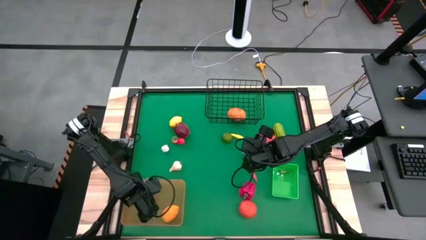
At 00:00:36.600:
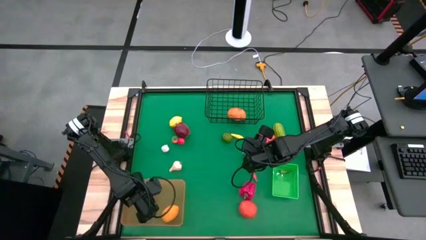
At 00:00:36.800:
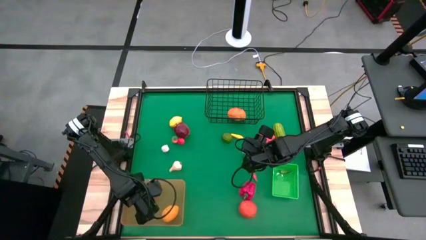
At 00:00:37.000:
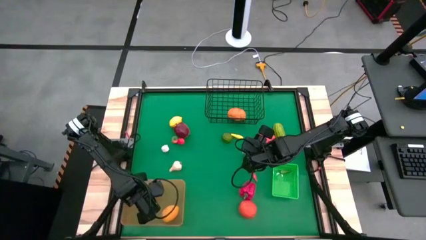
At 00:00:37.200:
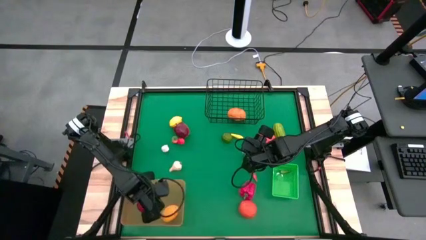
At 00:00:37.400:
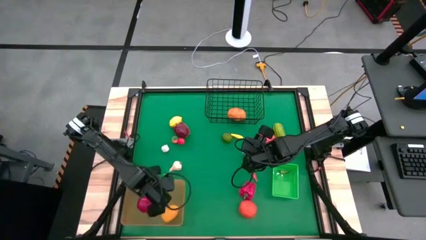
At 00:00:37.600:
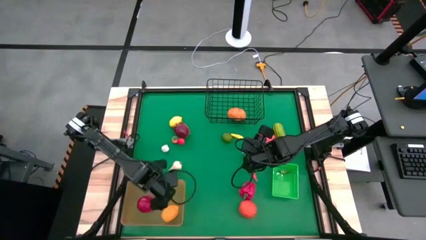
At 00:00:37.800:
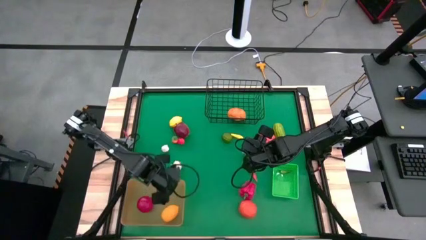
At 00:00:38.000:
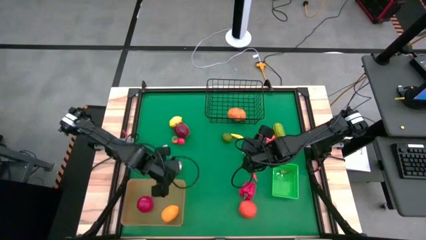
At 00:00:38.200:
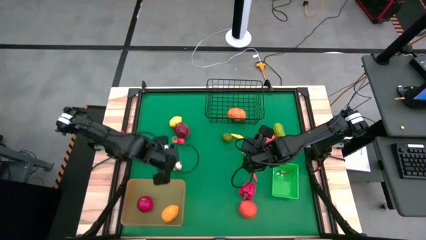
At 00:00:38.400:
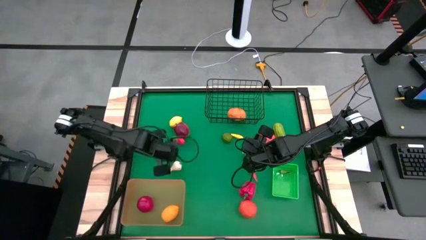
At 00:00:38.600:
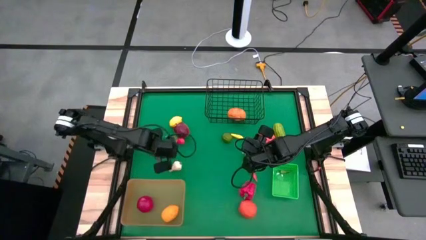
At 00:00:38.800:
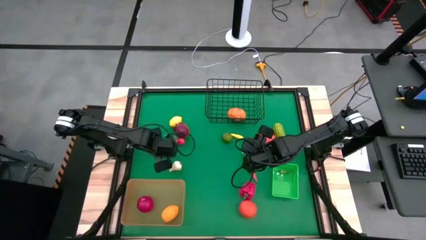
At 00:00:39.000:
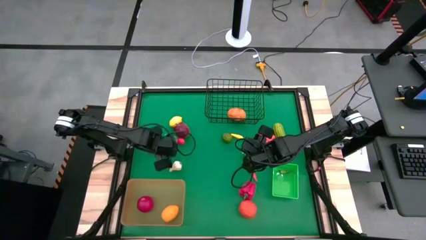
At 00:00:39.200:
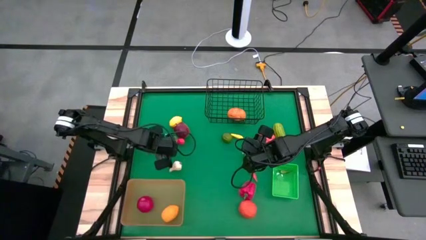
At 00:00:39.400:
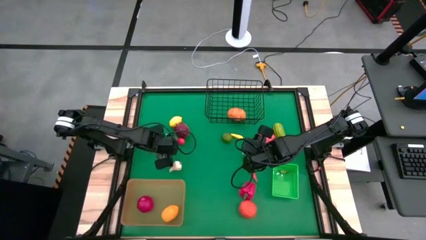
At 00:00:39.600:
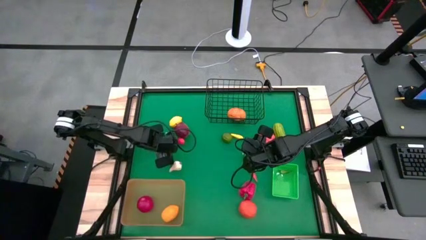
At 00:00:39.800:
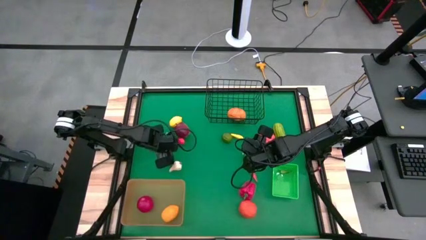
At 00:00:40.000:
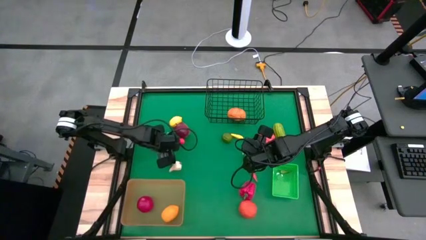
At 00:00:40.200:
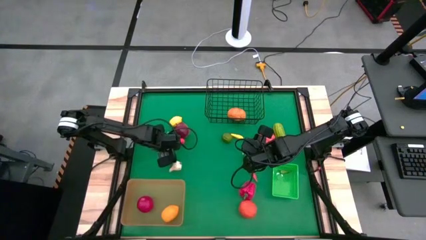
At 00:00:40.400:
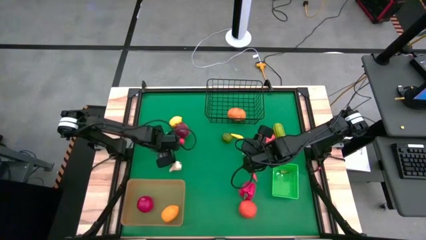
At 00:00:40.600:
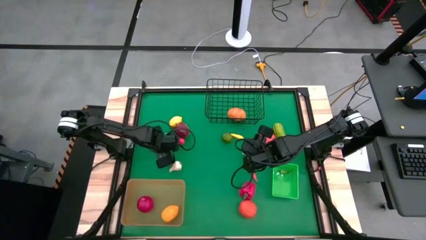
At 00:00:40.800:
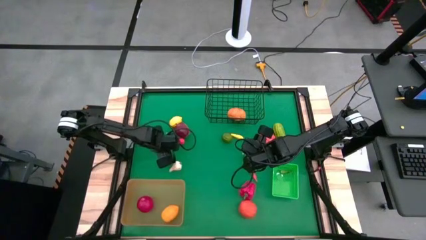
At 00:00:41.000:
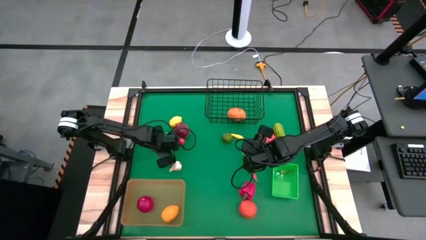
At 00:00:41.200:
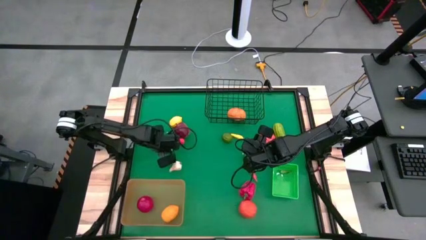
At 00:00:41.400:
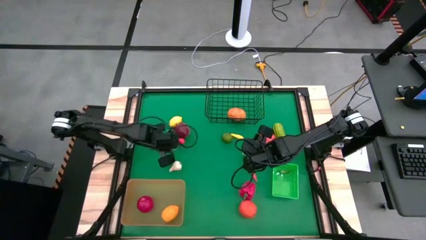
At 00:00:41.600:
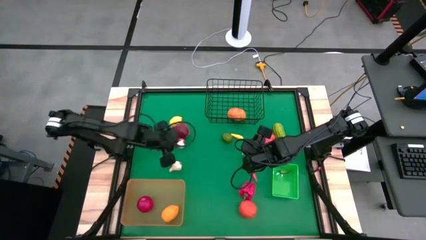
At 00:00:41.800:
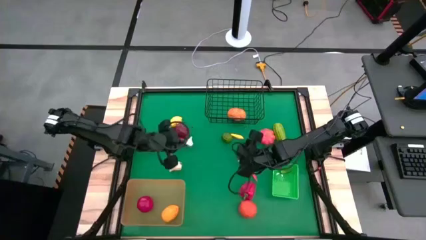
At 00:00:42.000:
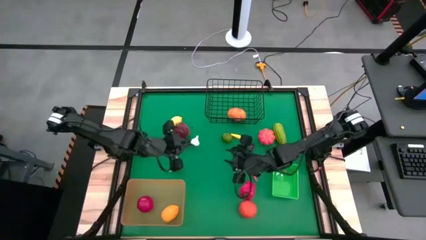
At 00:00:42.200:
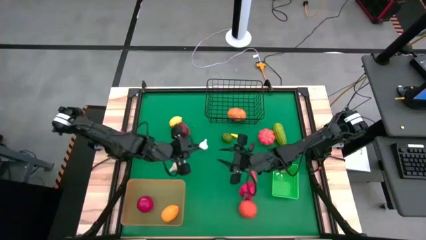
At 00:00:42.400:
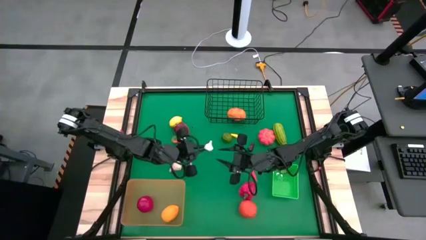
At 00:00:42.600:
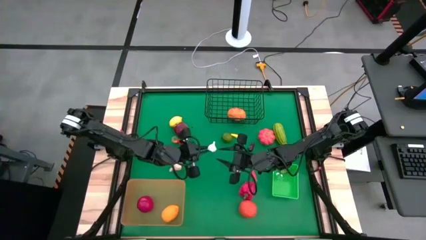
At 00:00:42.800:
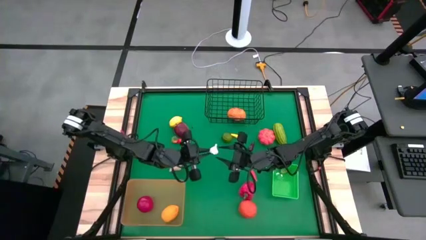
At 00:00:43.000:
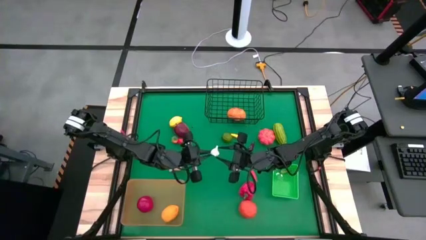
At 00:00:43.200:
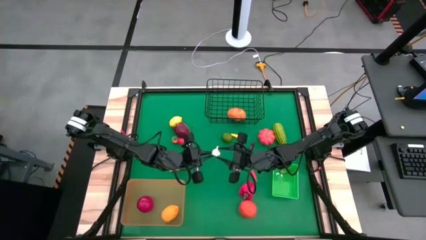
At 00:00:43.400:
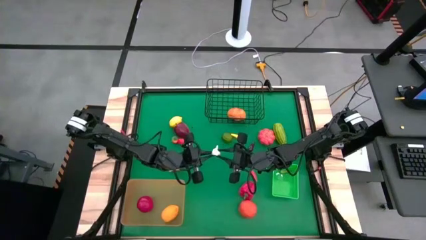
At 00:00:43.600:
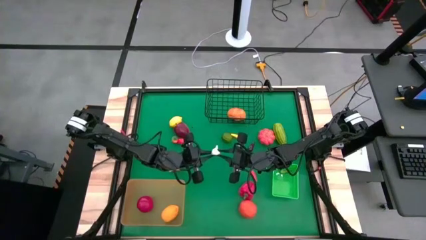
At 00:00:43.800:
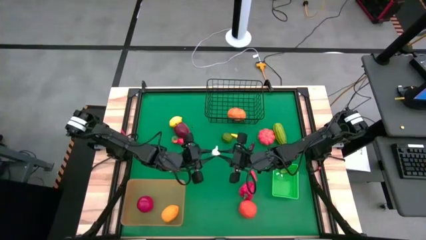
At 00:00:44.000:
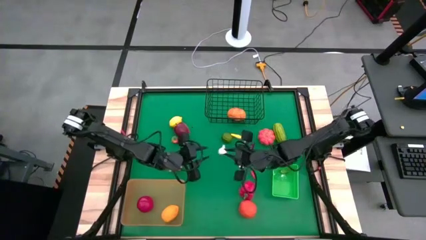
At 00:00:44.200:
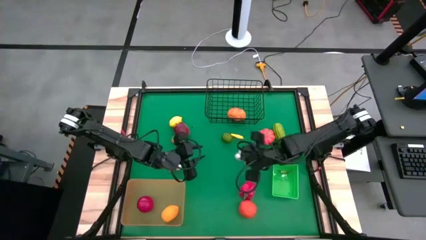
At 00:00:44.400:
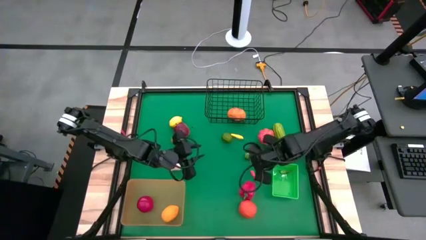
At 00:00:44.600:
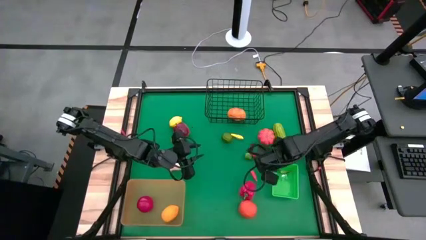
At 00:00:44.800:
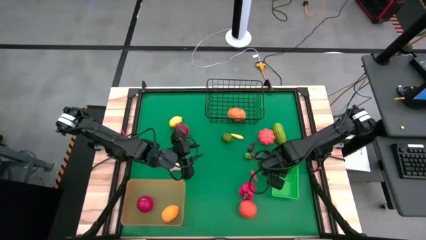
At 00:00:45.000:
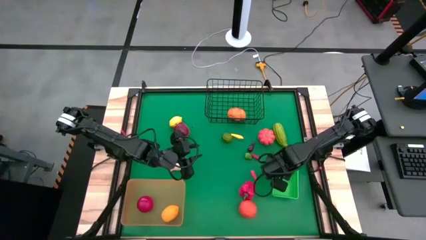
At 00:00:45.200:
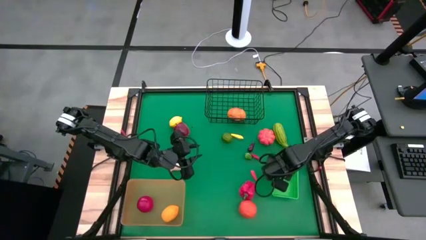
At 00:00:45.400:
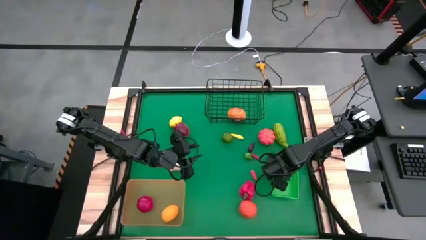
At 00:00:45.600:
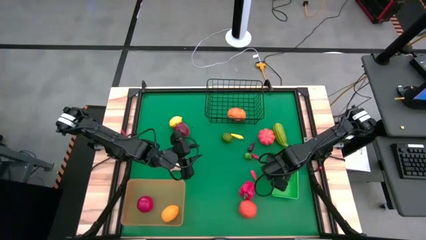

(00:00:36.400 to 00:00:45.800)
Task: Sort produce into baskets
Put the top garlic into the green basket

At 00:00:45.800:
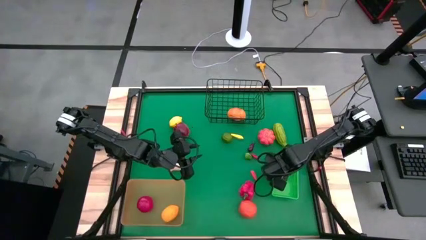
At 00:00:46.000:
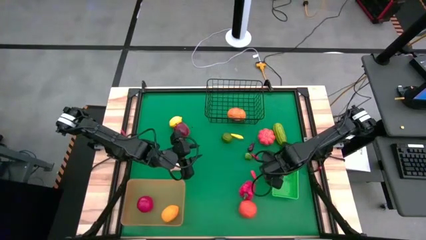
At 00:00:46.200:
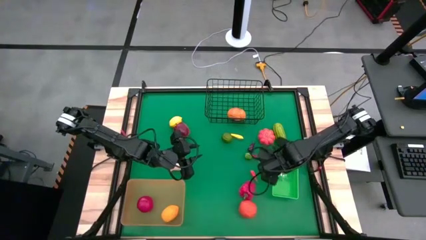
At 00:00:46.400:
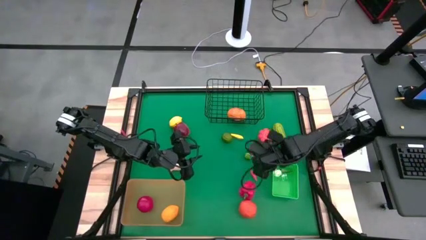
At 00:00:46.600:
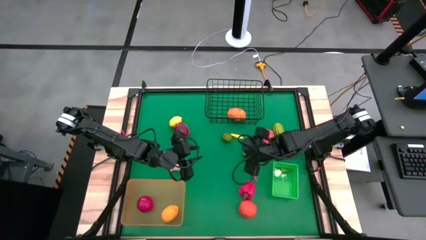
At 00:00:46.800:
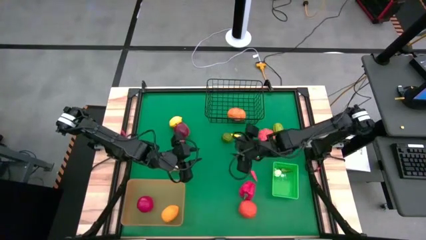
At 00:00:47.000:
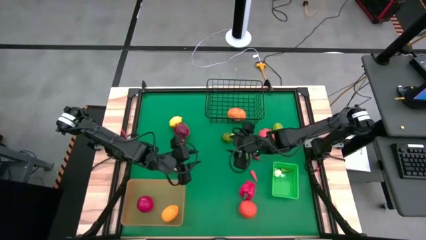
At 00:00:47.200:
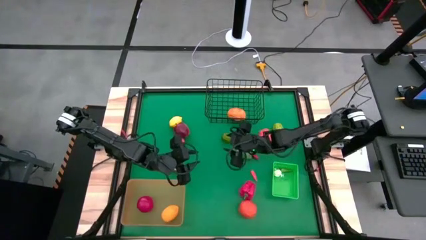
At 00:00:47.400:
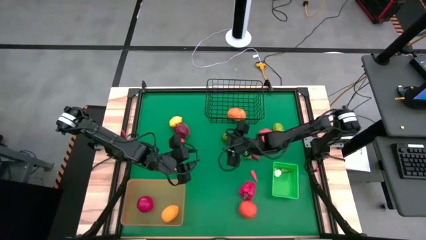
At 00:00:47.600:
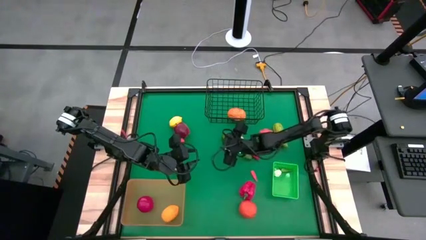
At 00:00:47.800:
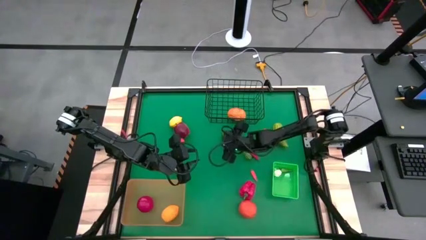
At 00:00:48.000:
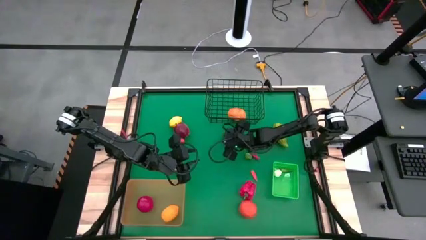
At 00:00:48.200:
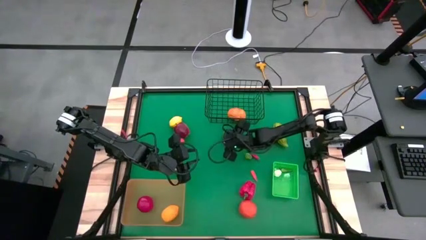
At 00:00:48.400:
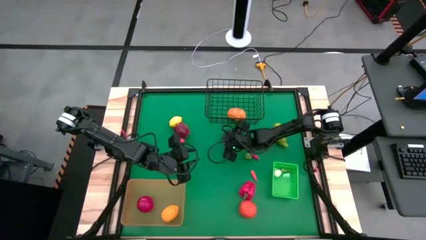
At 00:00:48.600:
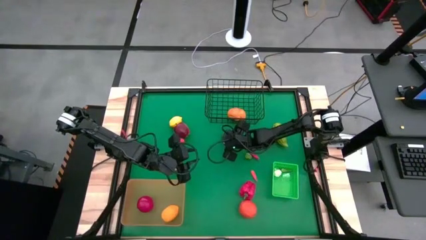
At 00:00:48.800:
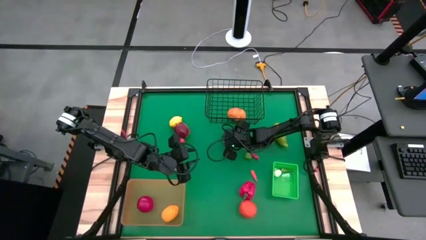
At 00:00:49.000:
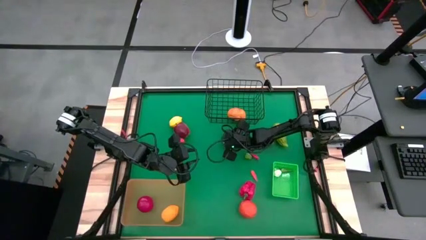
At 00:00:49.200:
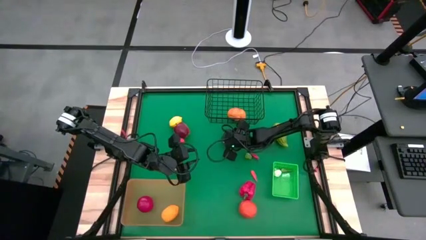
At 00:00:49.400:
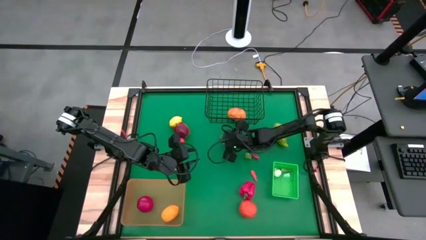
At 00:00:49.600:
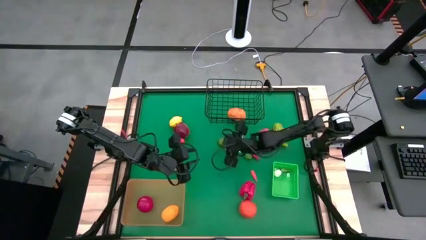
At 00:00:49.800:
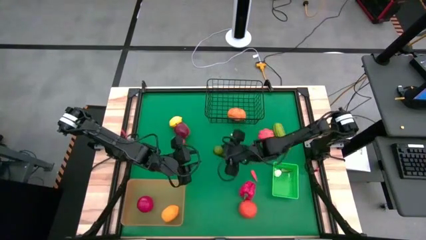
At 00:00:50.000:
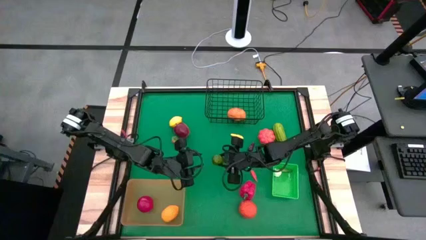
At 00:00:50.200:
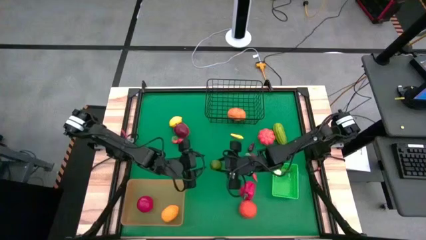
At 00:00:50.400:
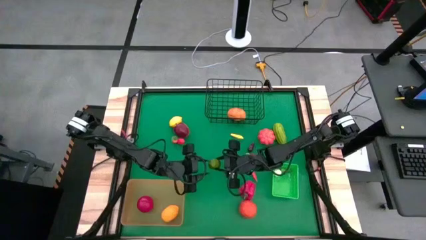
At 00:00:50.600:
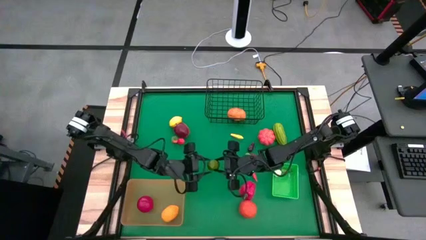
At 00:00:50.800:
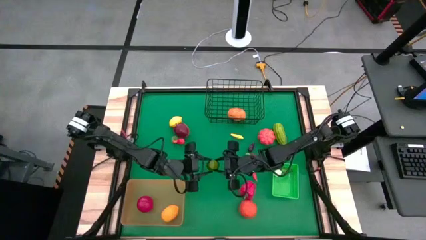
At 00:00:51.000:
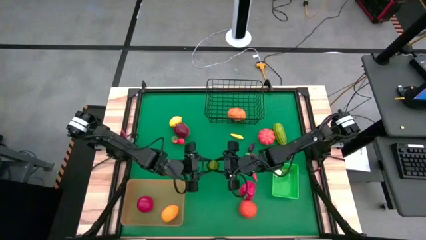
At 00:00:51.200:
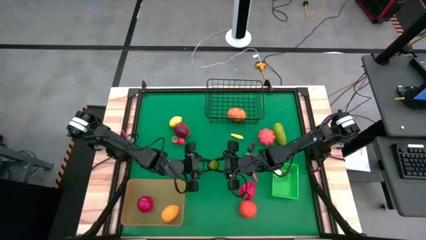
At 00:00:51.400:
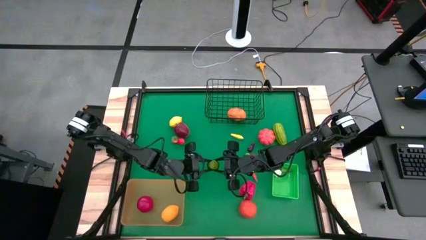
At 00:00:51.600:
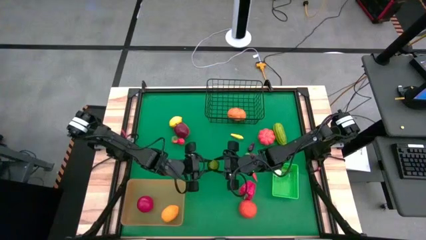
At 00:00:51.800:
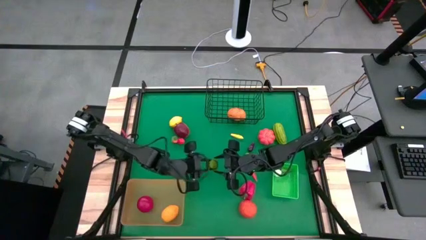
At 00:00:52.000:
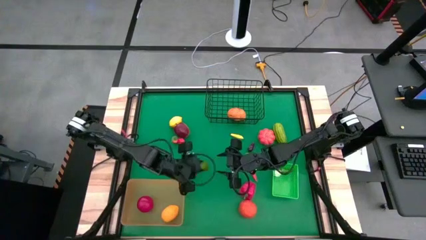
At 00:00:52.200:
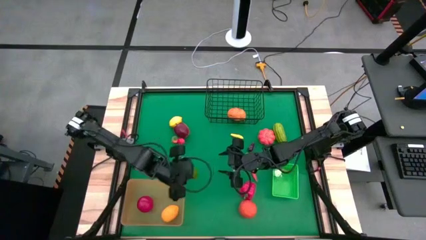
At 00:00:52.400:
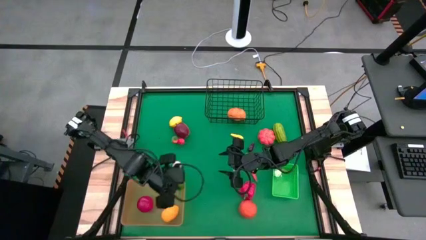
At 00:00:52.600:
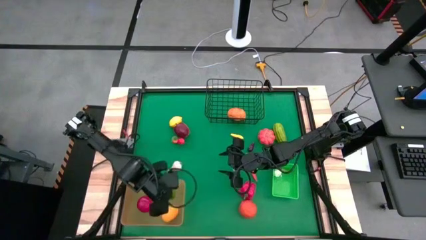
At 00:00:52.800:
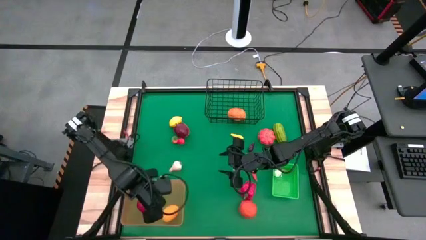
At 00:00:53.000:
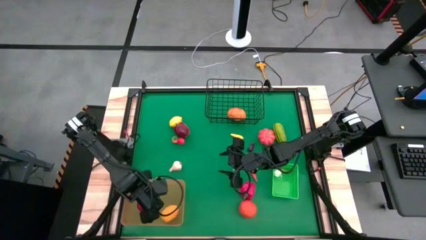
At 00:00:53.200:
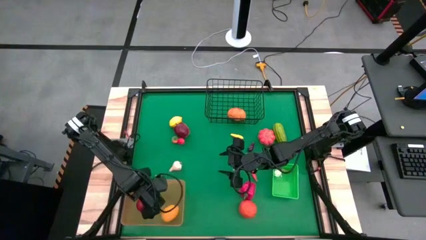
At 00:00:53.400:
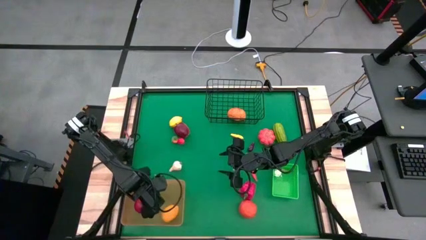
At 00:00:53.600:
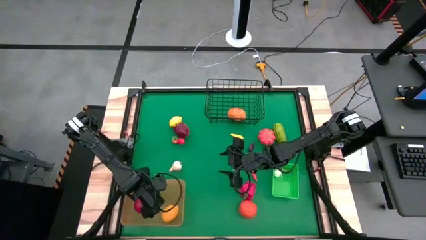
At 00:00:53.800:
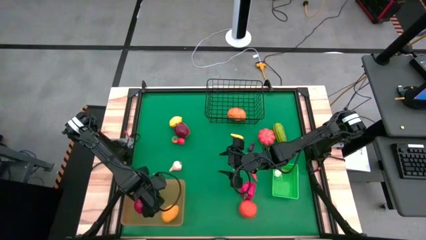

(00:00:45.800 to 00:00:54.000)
Put the green lime into the orange bin
